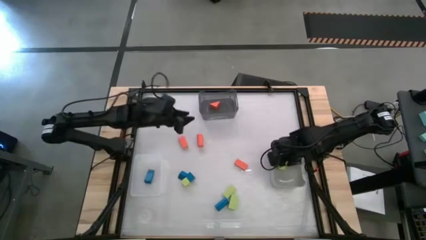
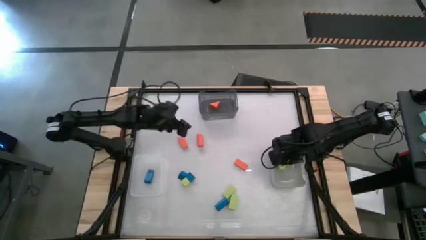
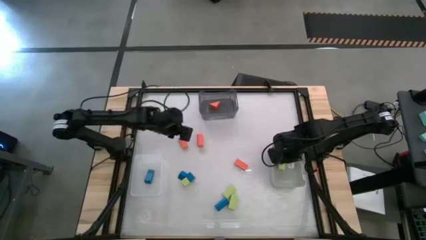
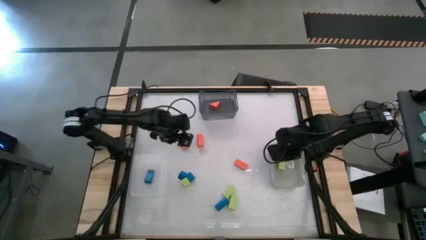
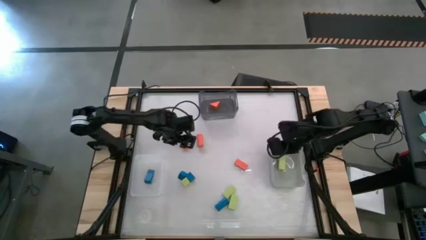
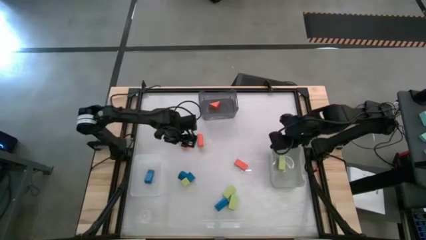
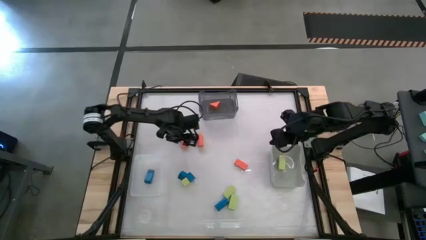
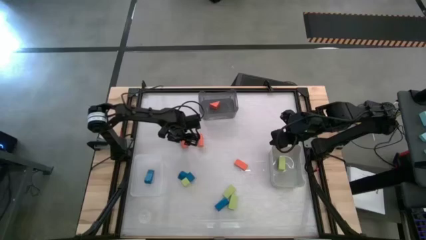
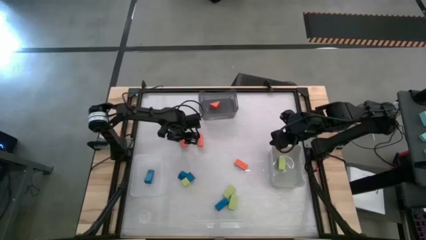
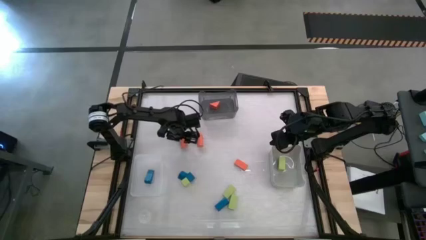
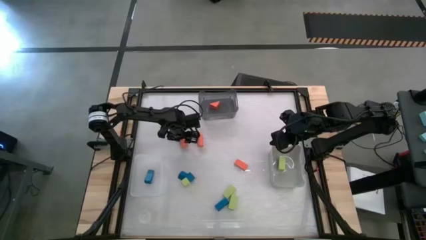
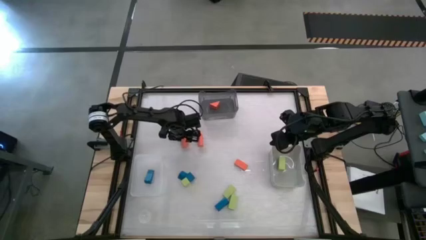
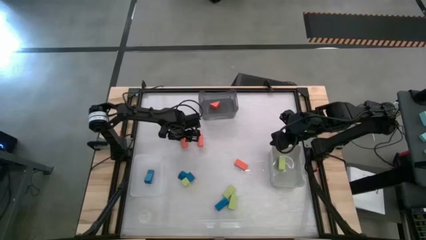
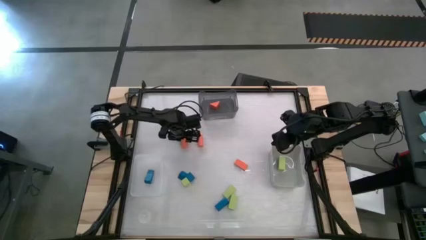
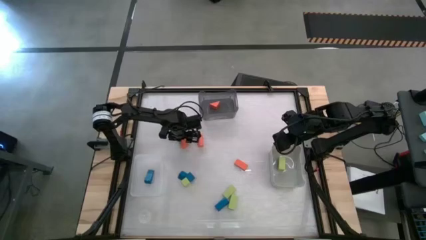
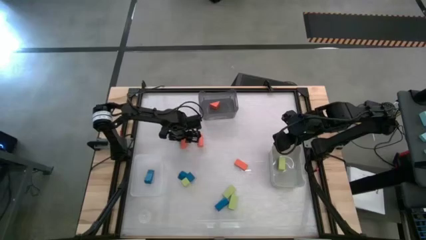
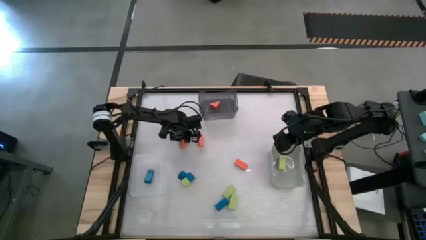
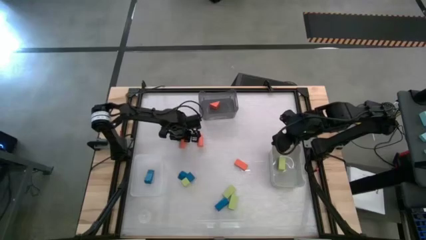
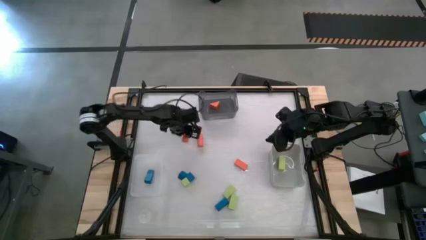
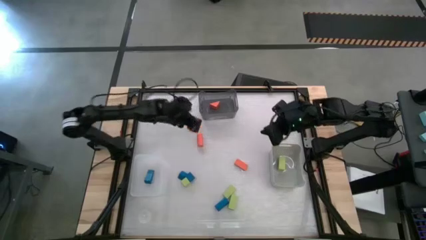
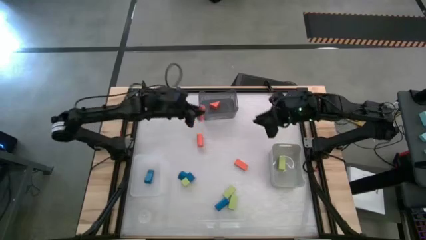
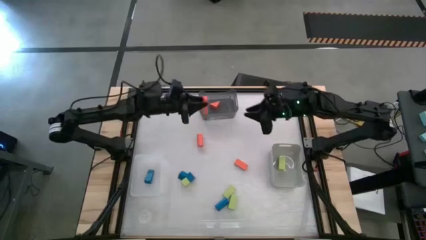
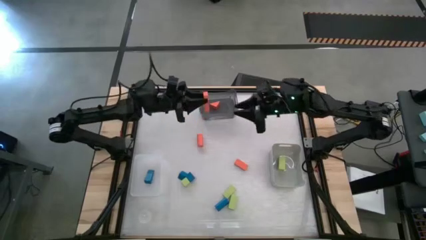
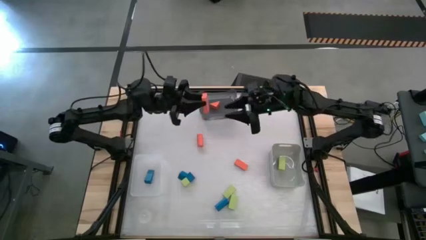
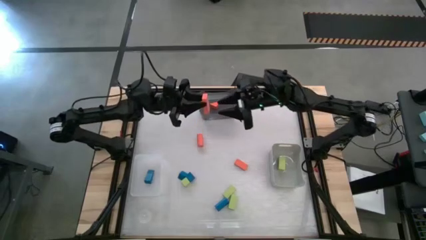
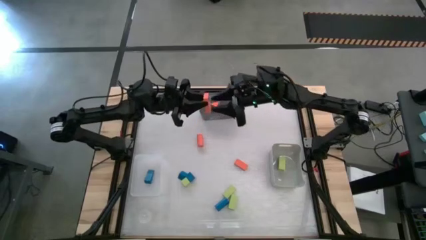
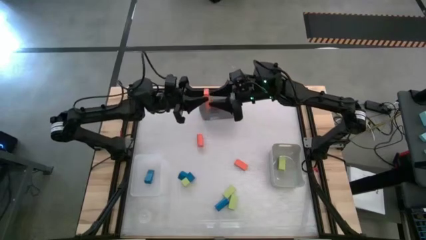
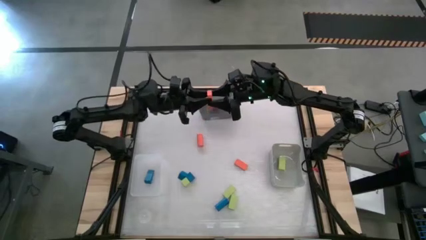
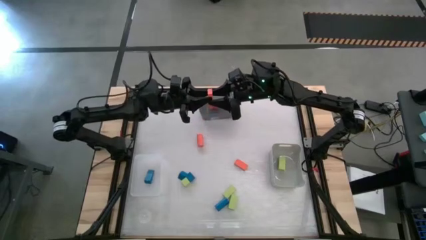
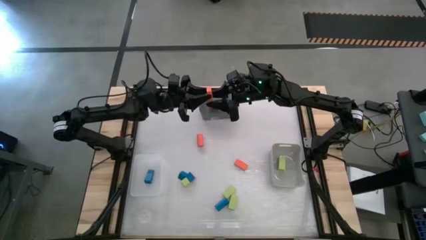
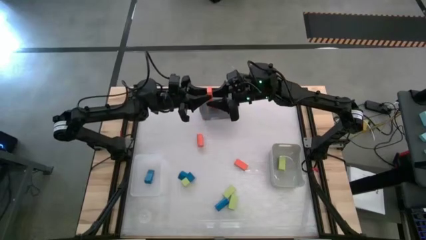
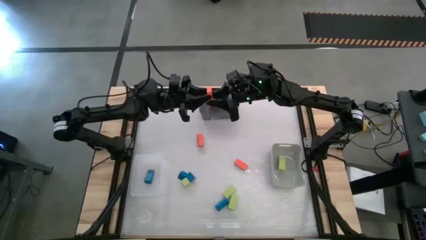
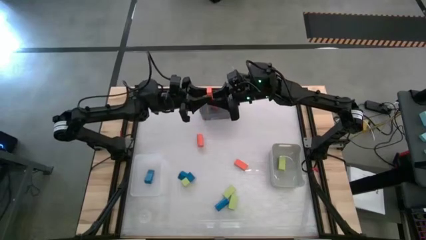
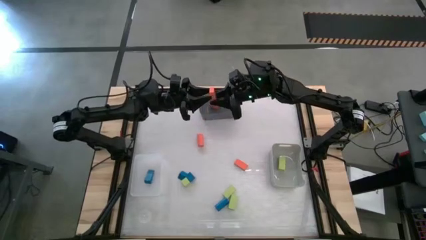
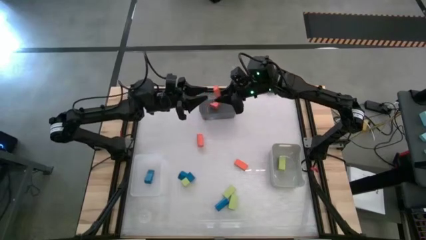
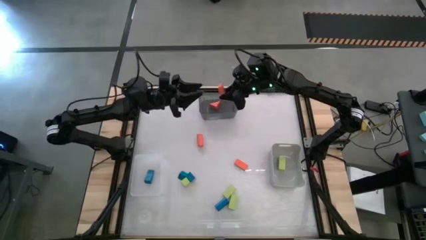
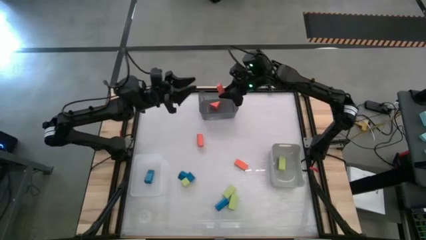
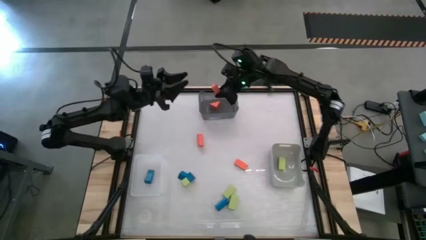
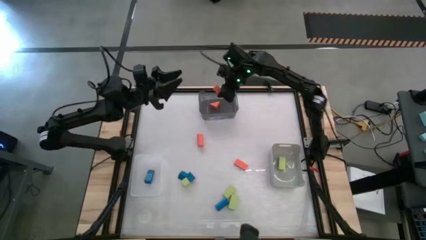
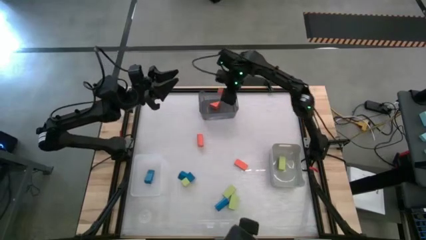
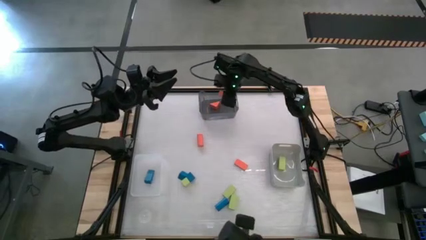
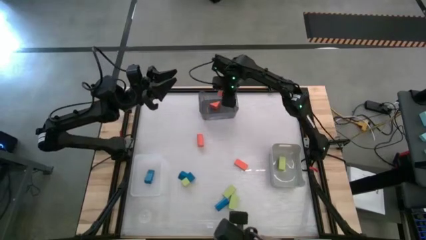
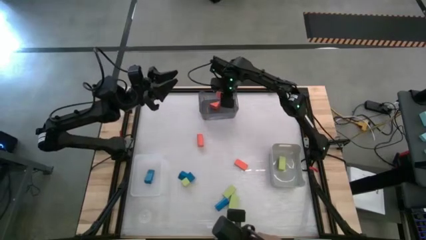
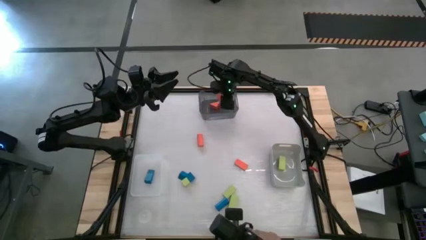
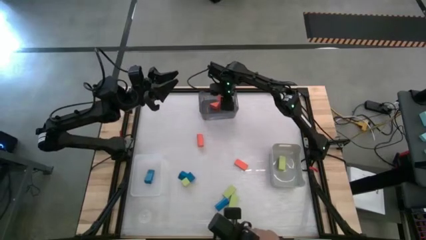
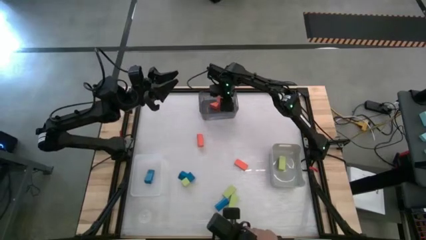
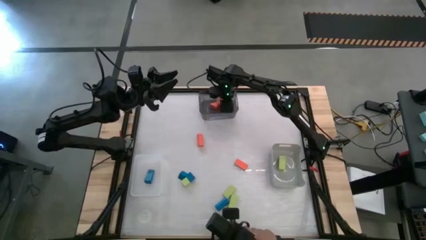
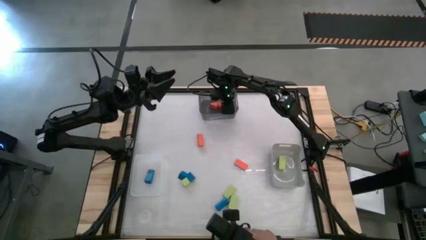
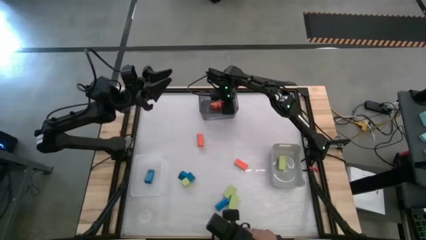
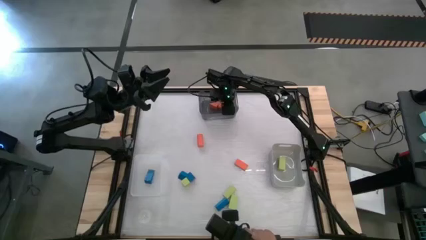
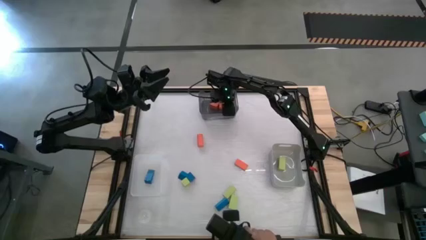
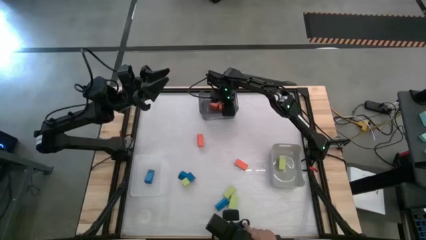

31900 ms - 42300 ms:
Task: Sort & place blocks by color
Put the orange block into the black bin

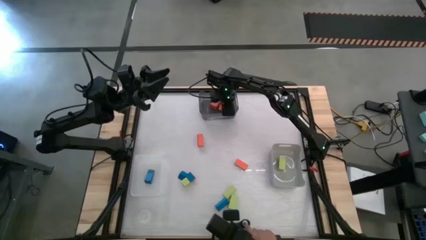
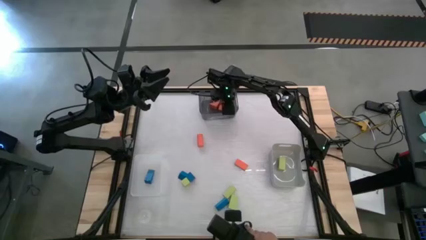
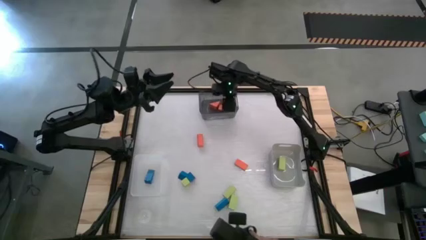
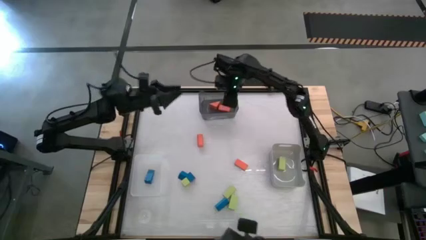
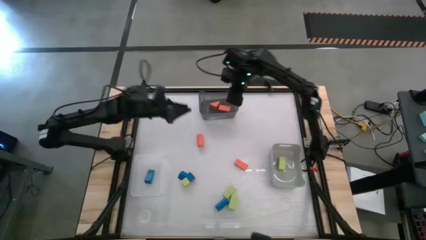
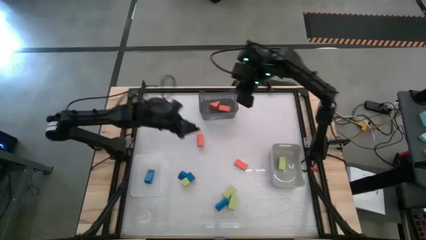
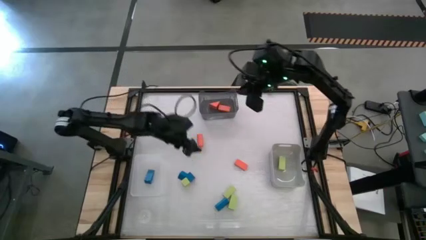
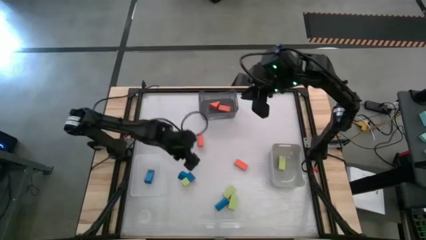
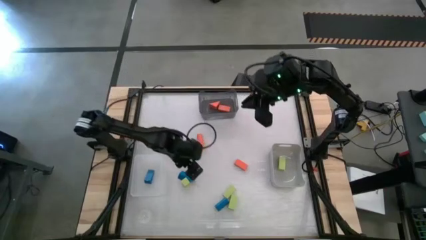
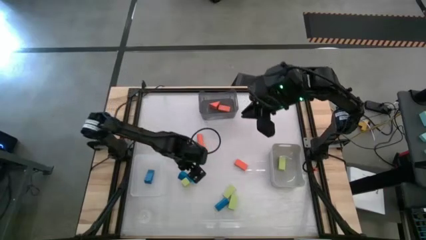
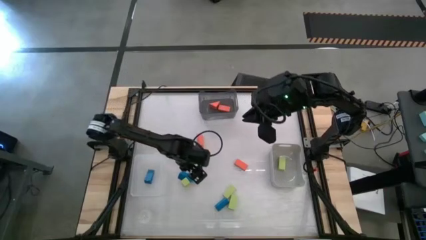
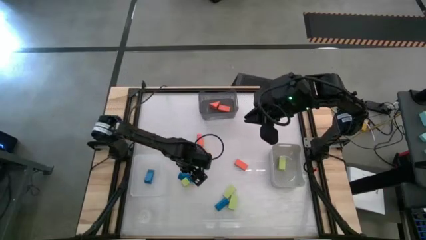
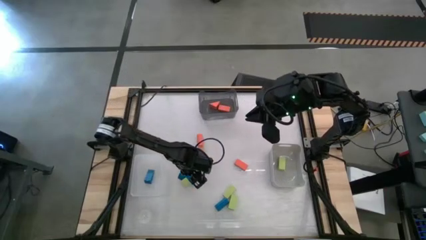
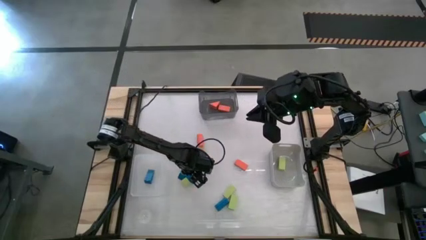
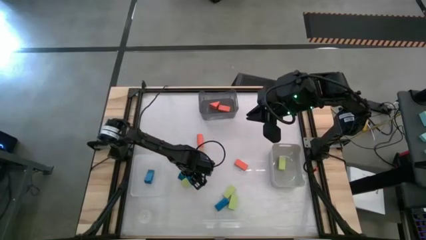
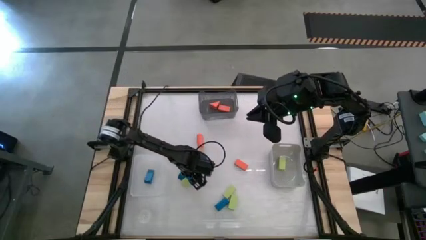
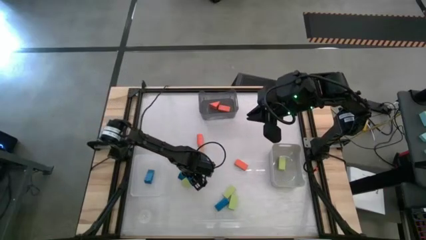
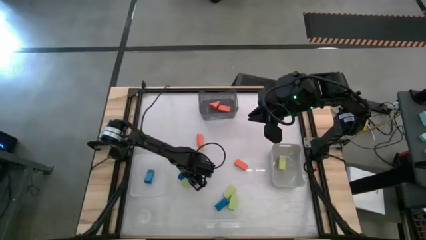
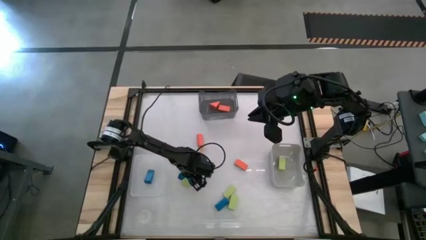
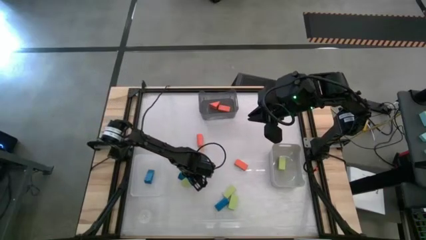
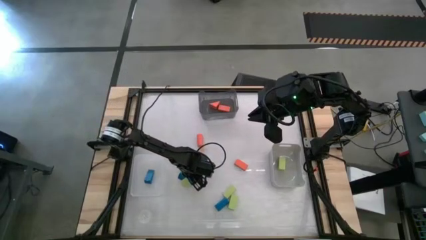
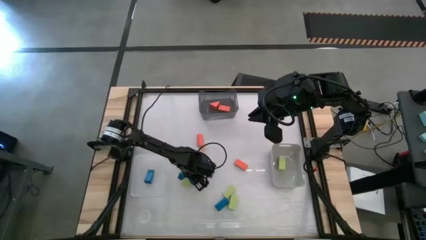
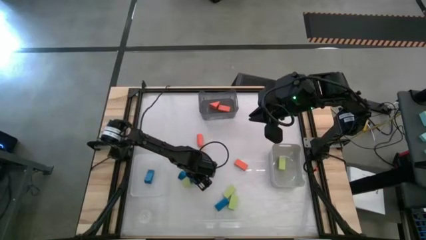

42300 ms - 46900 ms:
Put the blue block into the white bin
